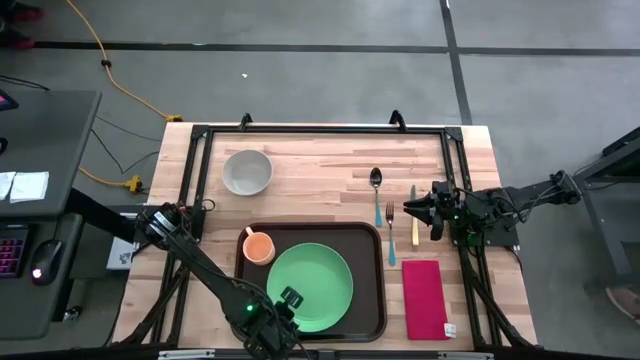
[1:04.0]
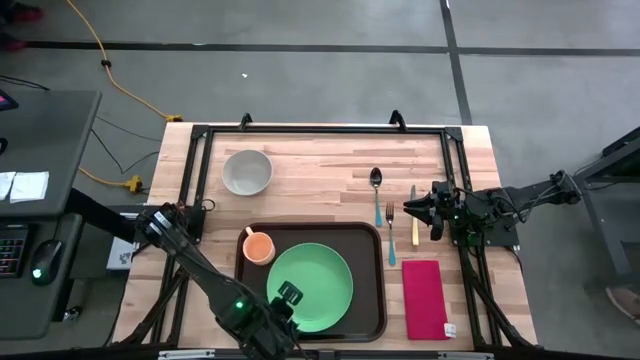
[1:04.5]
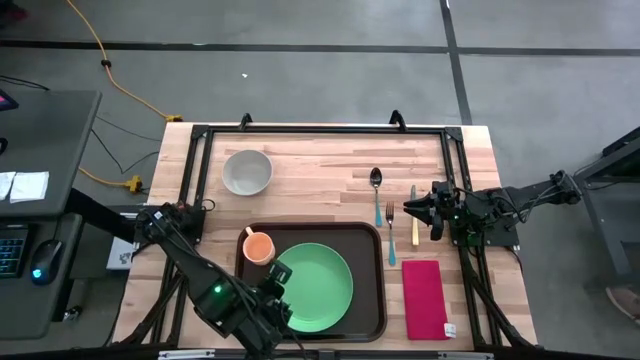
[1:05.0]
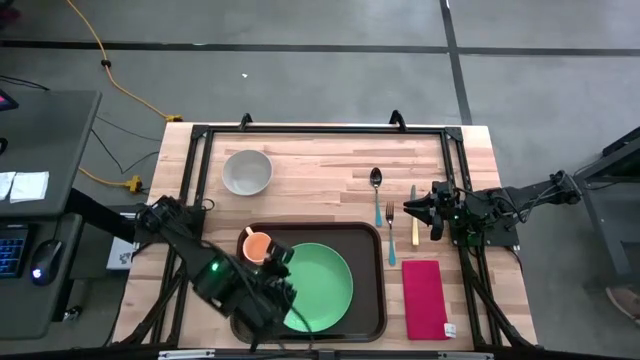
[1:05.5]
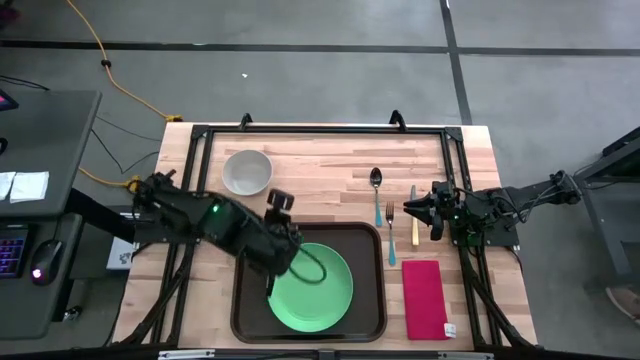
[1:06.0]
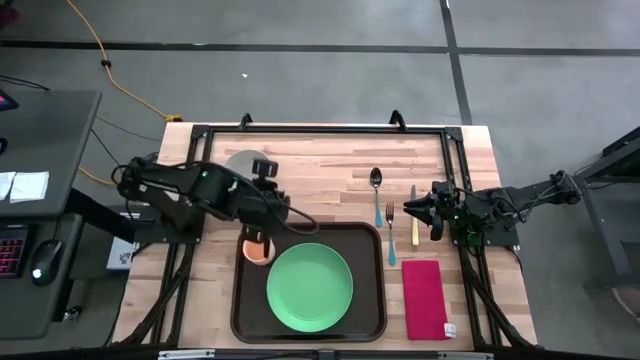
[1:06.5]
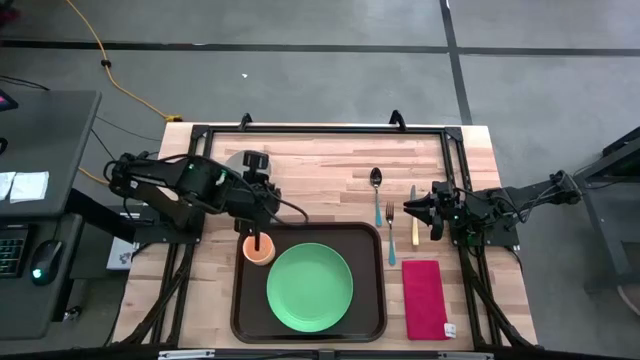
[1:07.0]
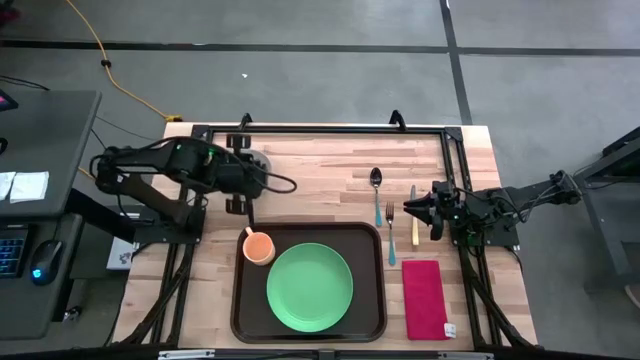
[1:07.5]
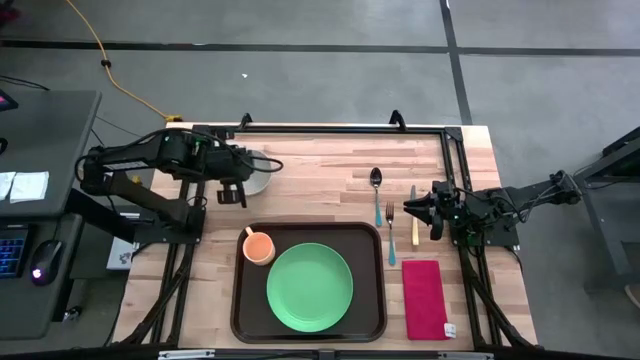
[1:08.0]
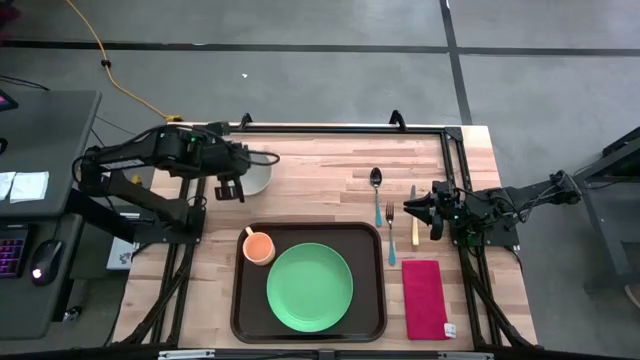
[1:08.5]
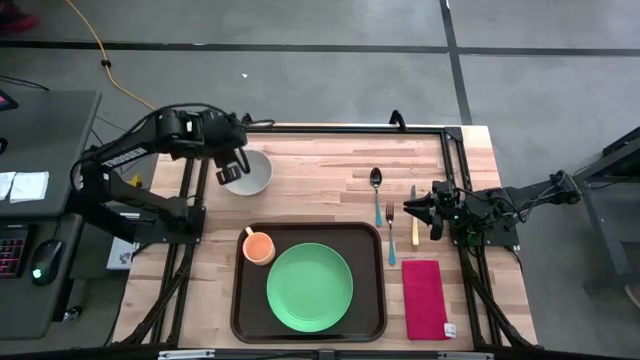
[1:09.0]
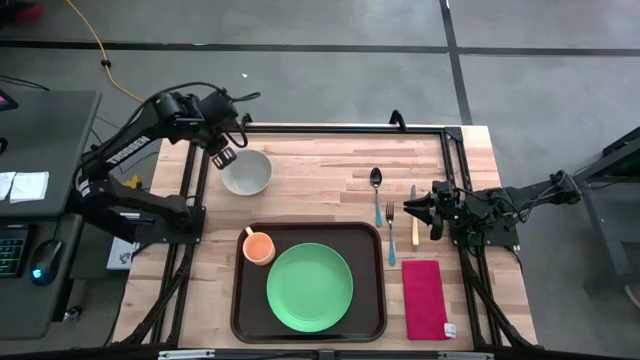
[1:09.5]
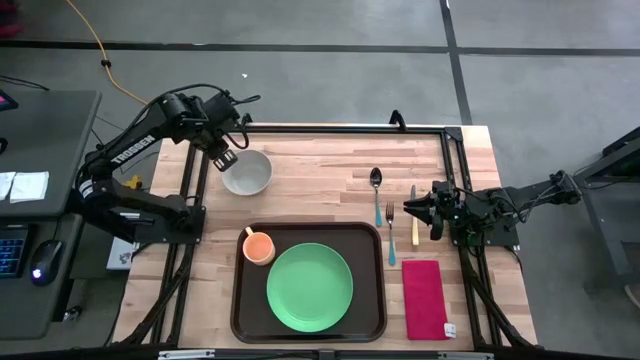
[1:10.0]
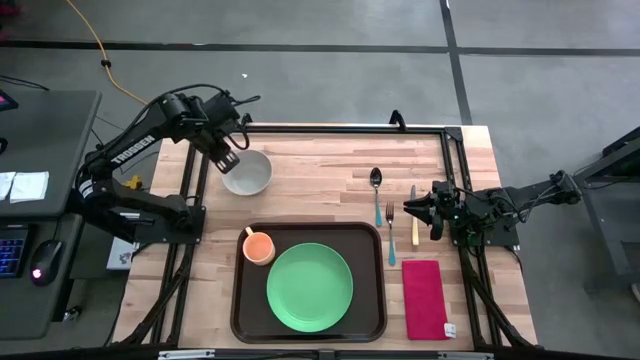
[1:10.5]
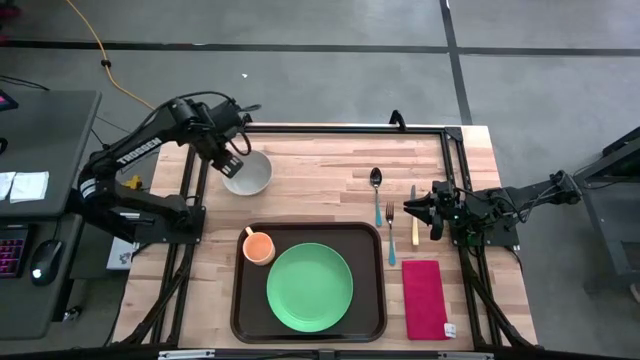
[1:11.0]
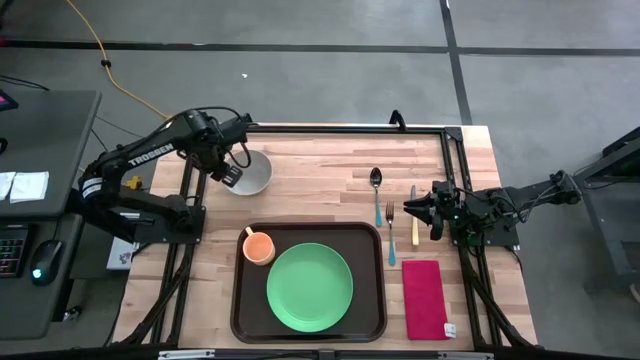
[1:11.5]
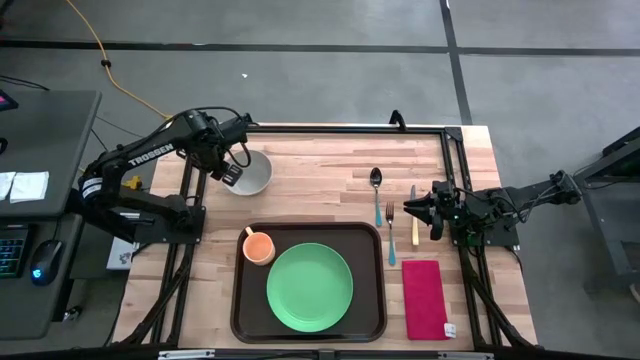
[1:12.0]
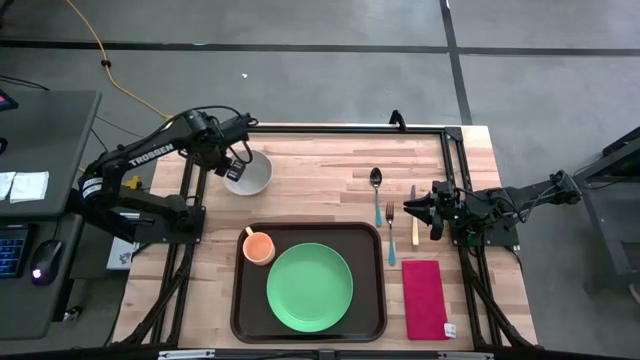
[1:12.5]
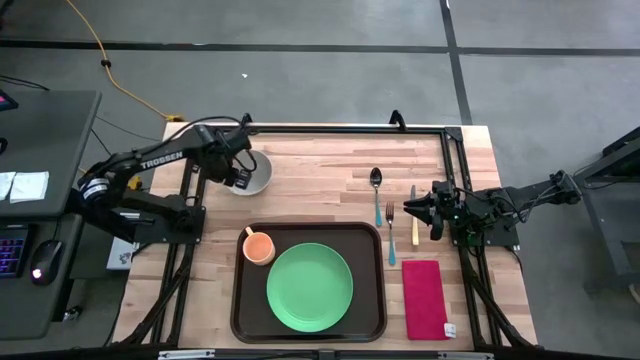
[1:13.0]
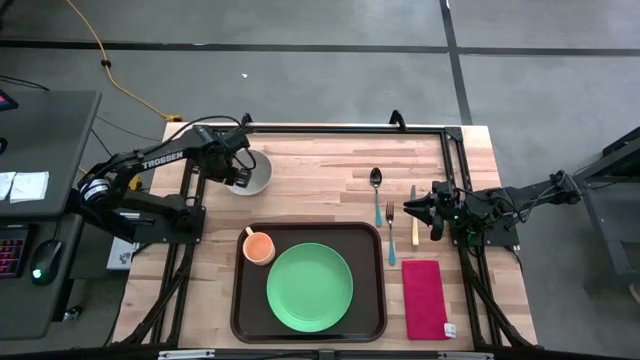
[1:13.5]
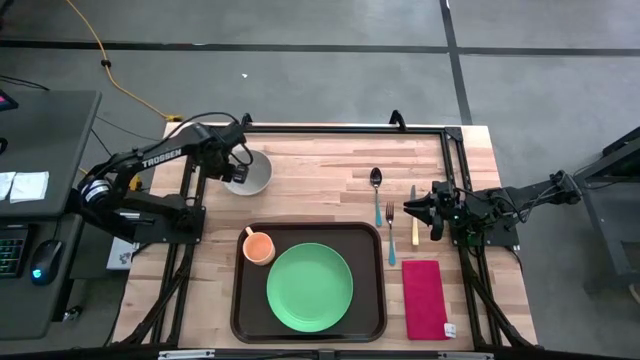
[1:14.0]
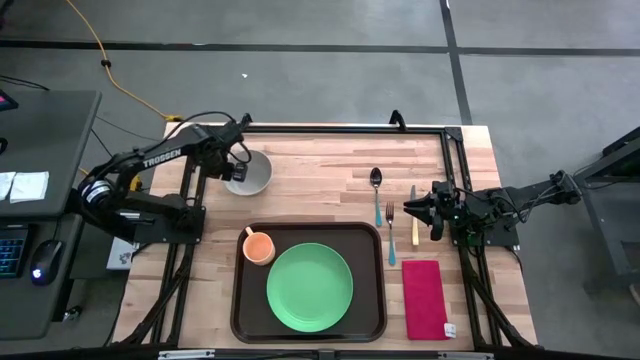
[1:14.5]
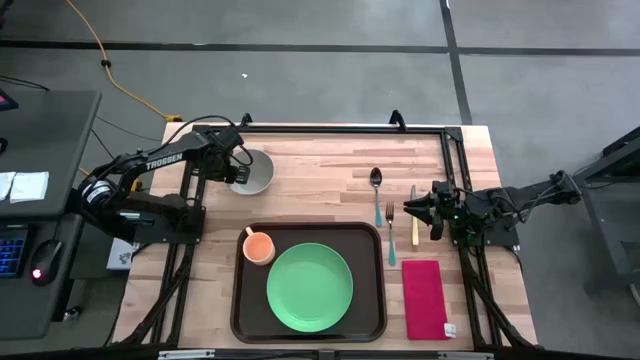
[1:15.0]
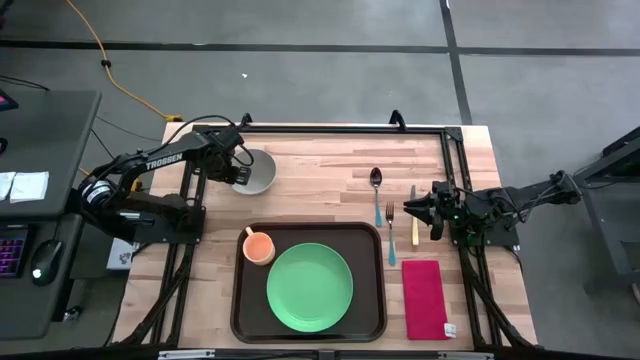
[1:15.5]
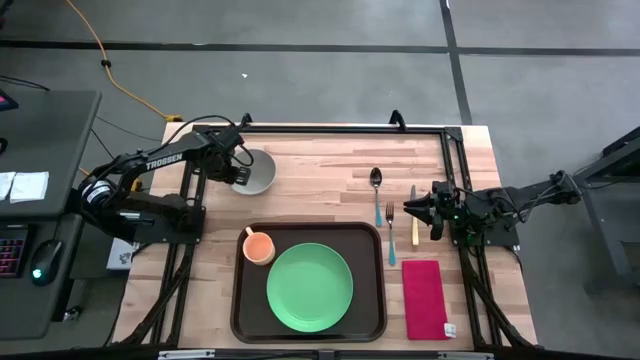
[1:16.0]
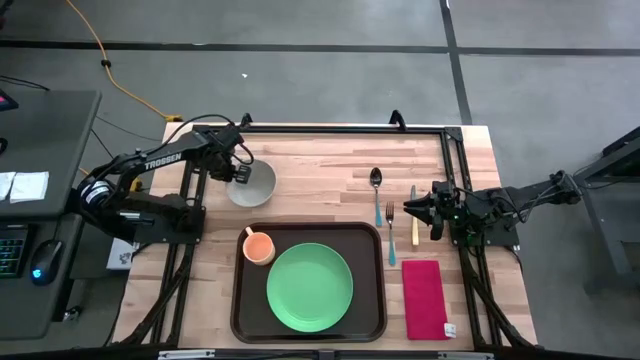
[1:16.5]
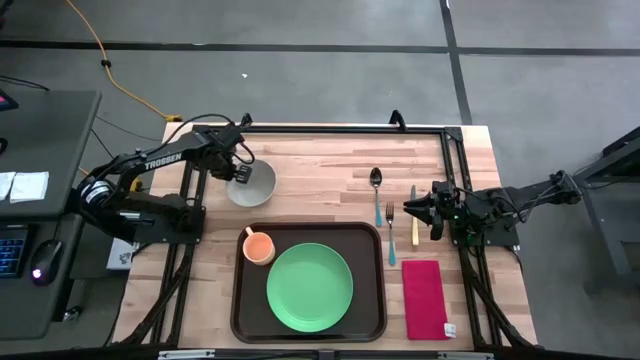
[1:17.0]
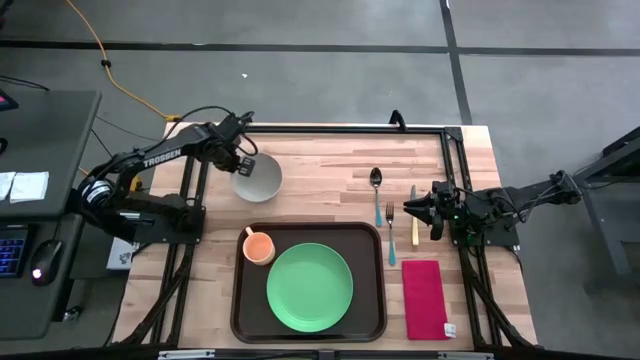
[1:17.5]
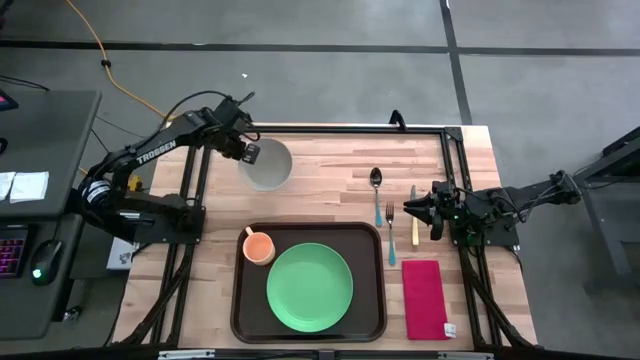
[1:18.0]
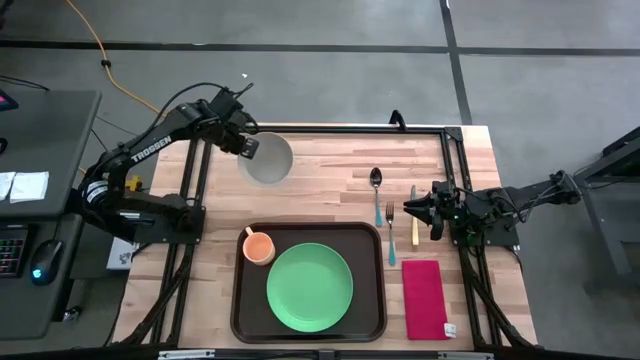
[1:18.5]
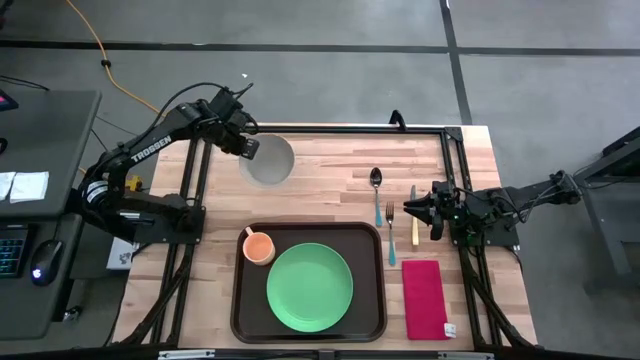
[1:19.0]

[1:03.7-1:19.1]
Task: Set up tray
Put the gray bowl on top of the green plate on the brown serving tray

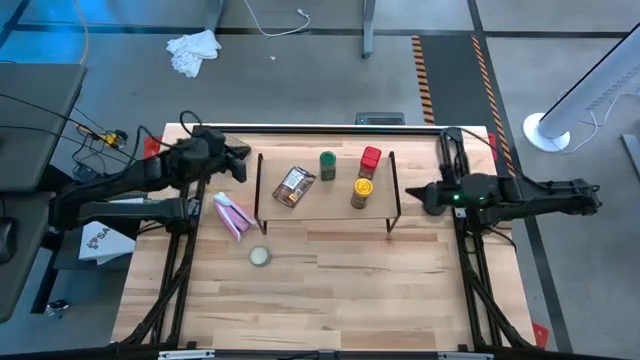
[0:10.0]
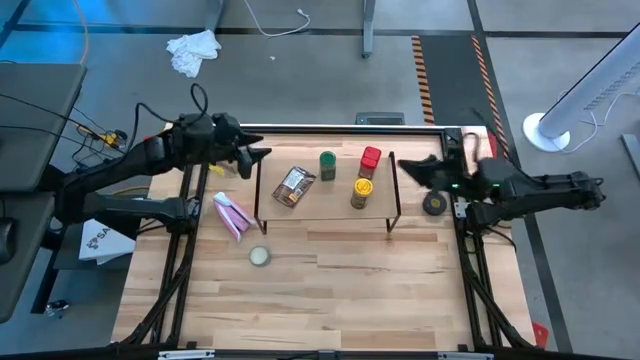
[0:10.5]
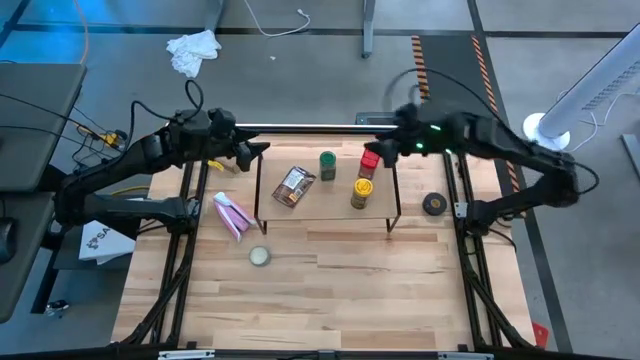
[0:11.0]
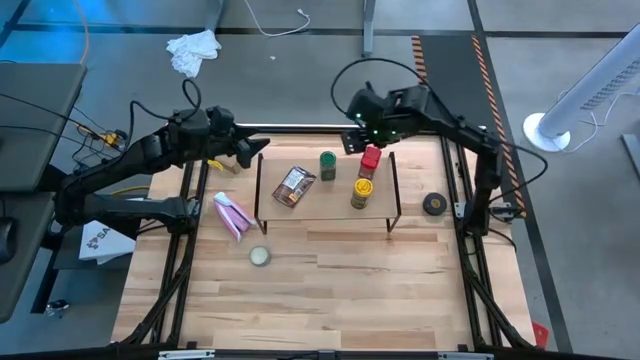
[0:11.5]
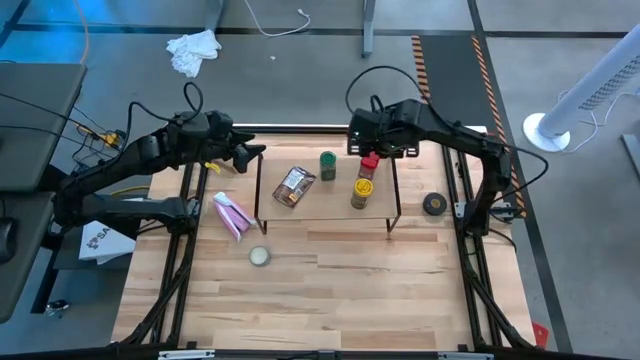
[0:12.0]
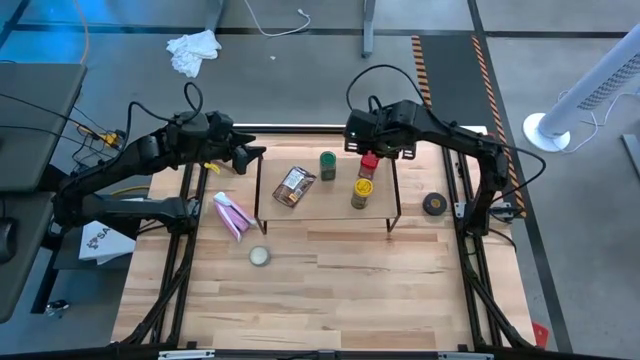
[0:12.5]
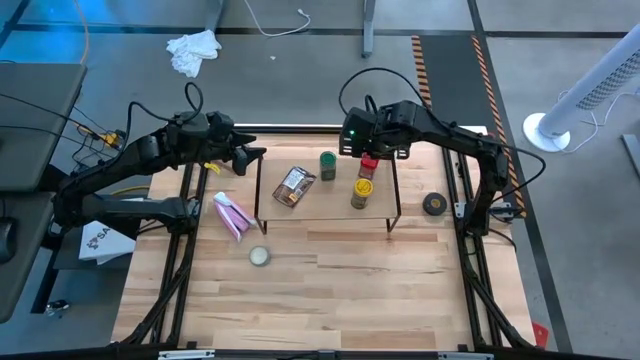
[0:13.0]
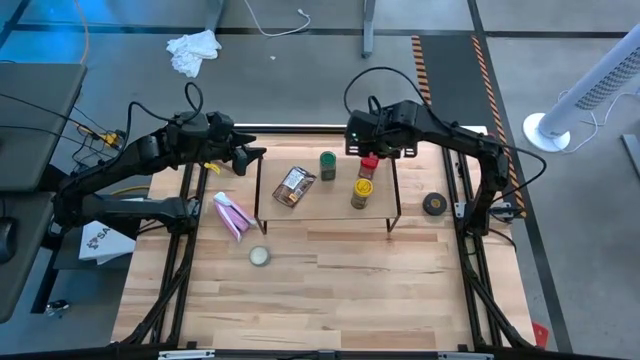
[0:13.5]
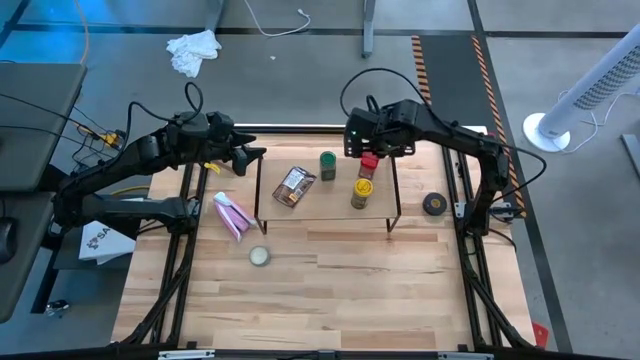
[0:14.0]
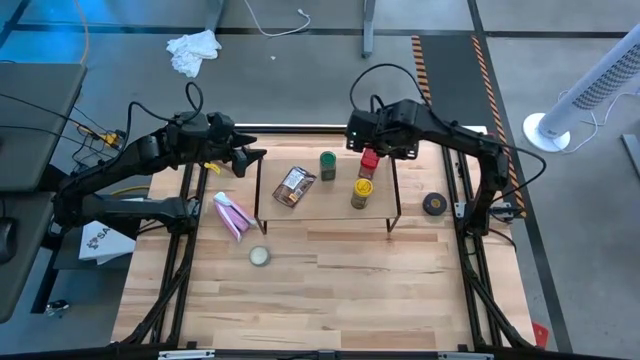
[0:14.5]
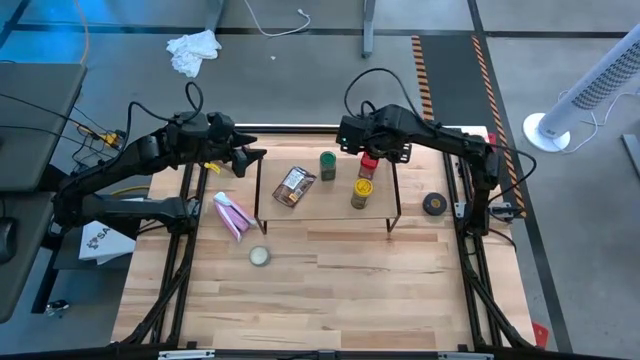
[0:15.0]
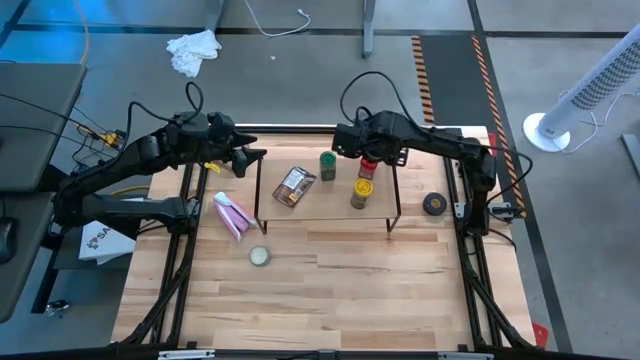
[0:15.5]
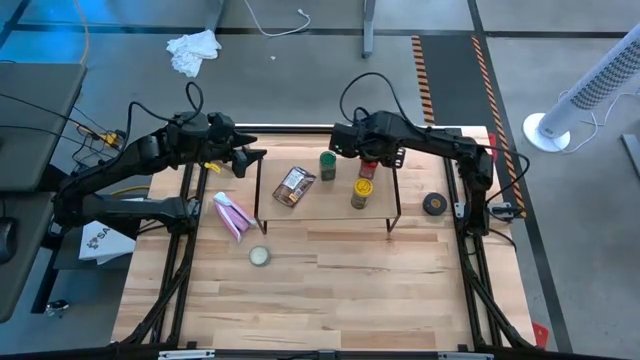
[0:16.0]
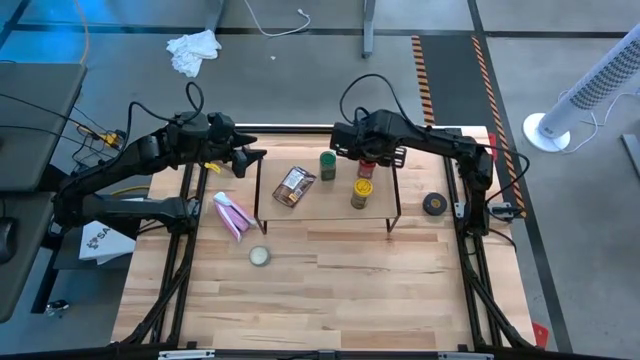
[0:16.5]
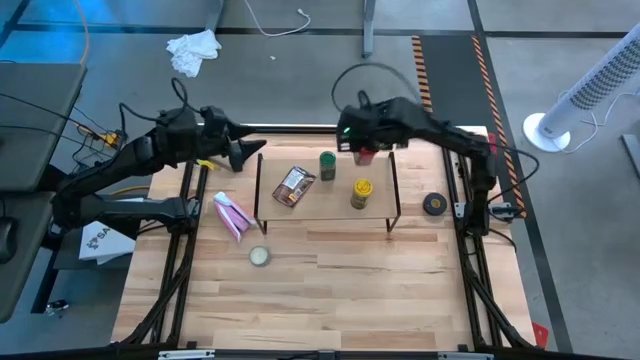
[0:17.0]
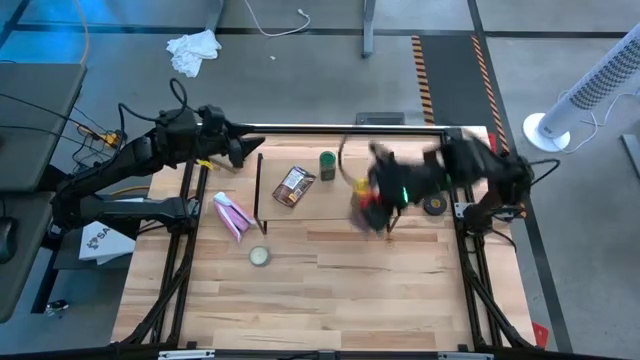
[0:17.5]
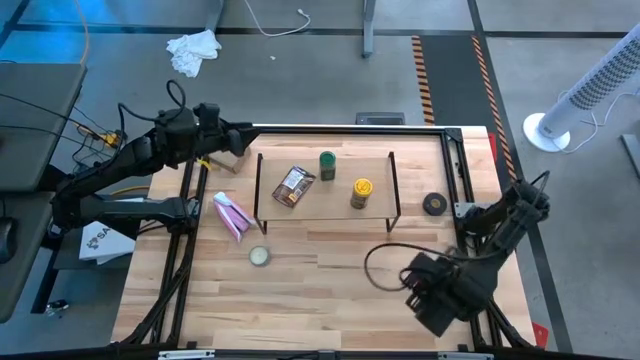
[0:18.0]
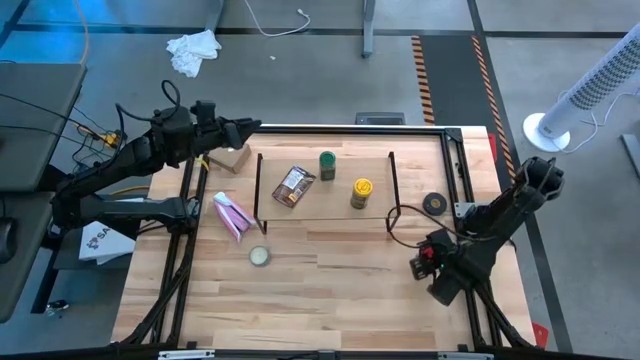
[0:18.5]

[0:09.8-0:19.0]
Task: Shelf spices
Remove the red spice can from the shelf
